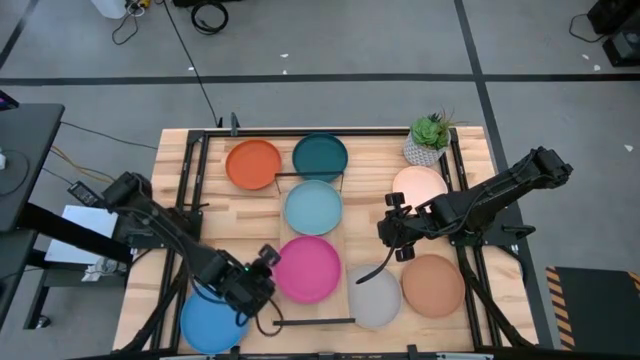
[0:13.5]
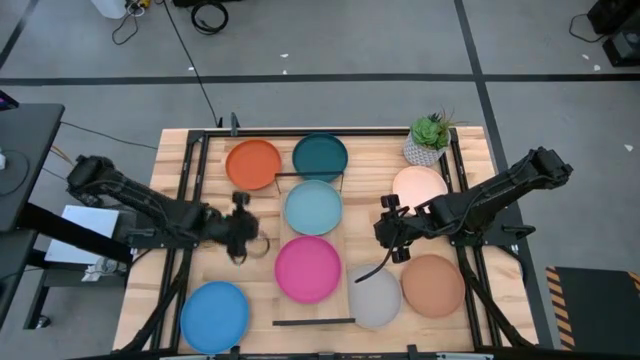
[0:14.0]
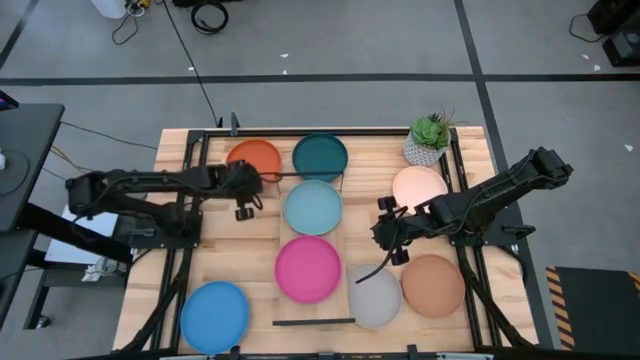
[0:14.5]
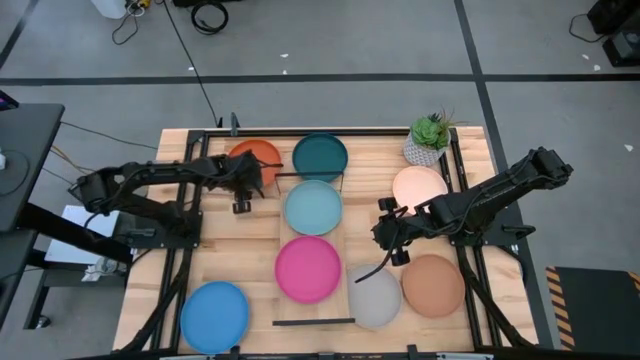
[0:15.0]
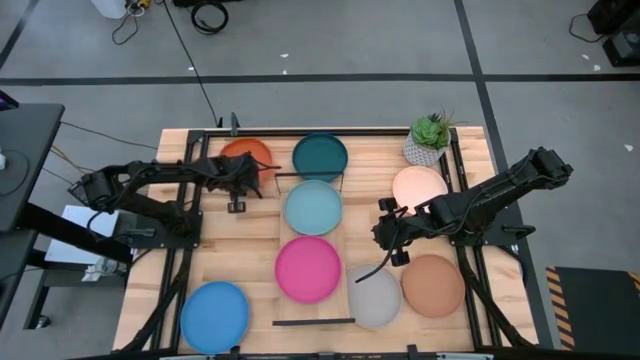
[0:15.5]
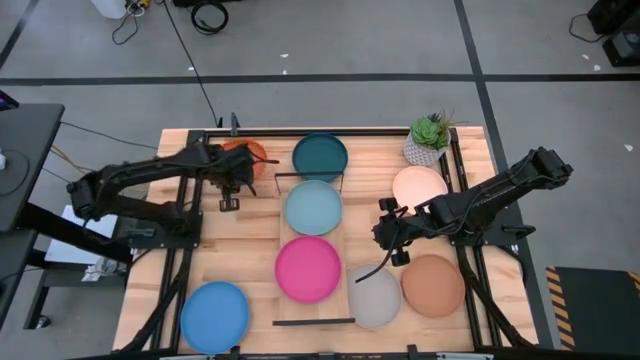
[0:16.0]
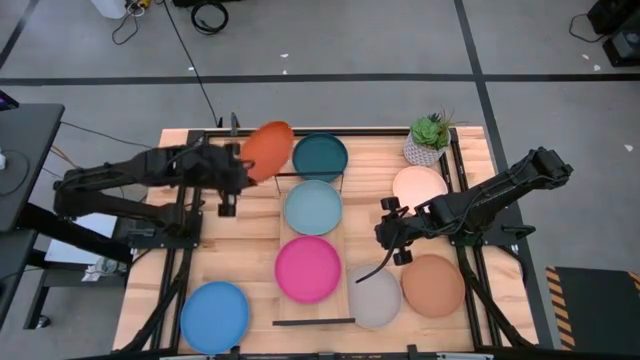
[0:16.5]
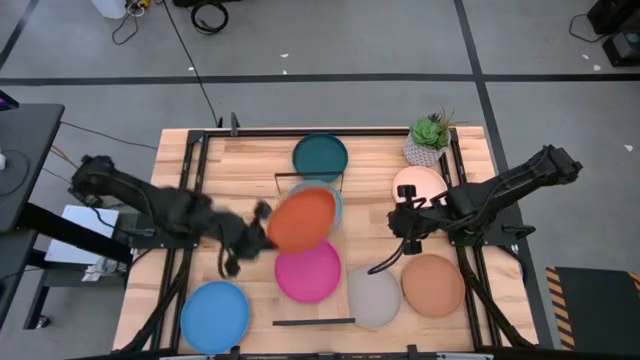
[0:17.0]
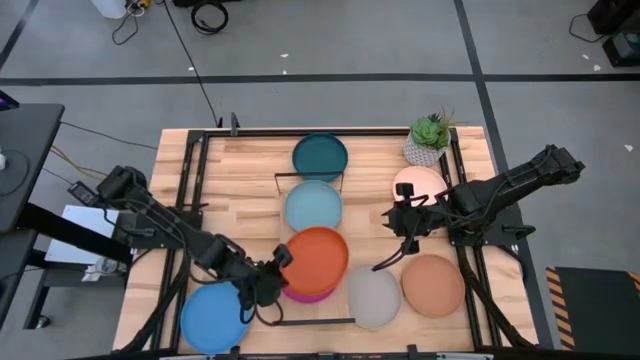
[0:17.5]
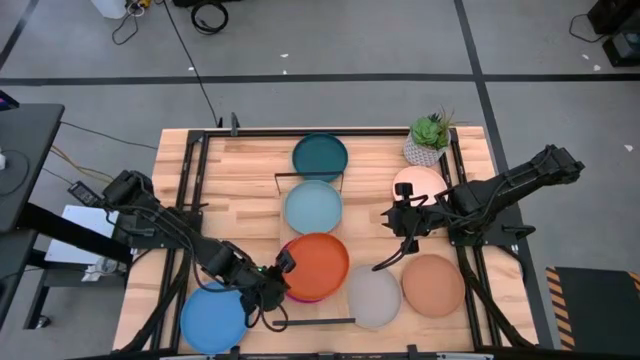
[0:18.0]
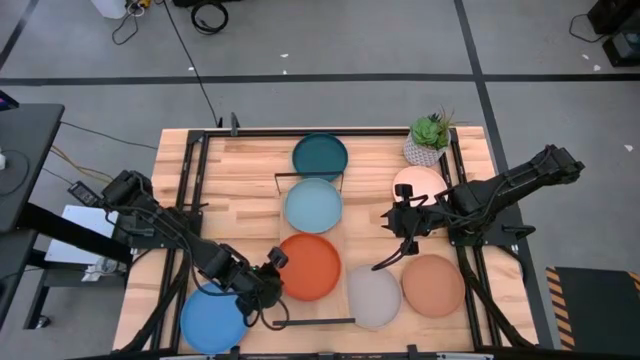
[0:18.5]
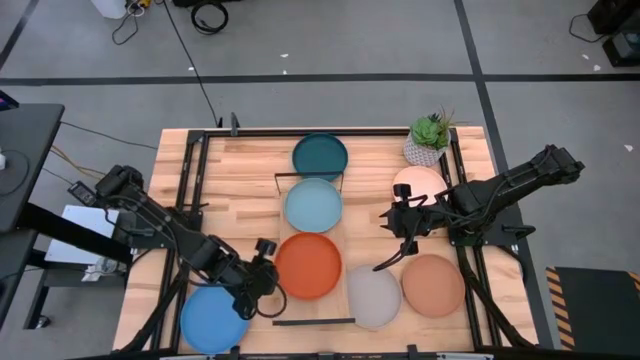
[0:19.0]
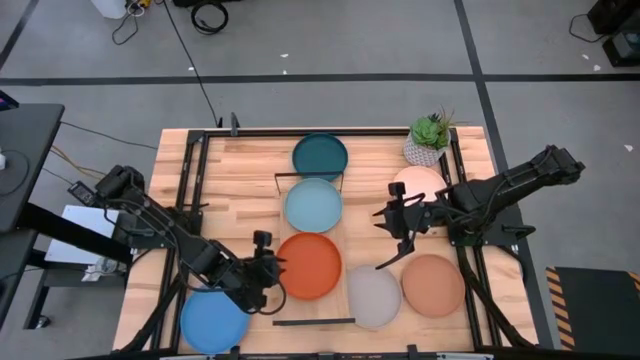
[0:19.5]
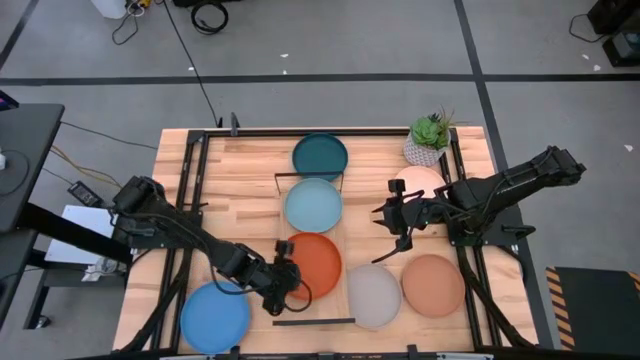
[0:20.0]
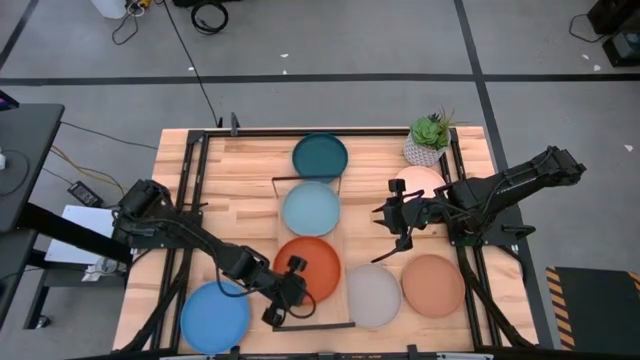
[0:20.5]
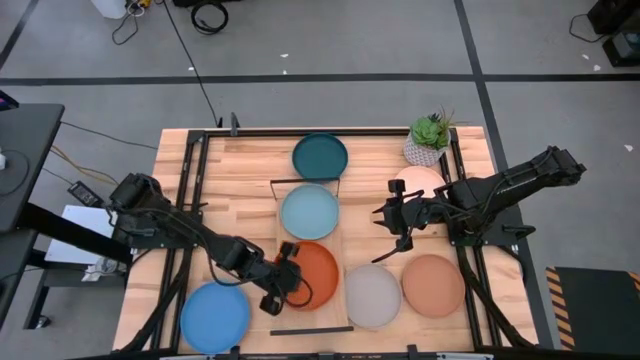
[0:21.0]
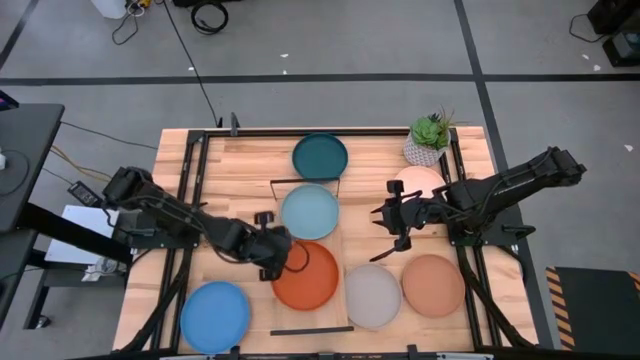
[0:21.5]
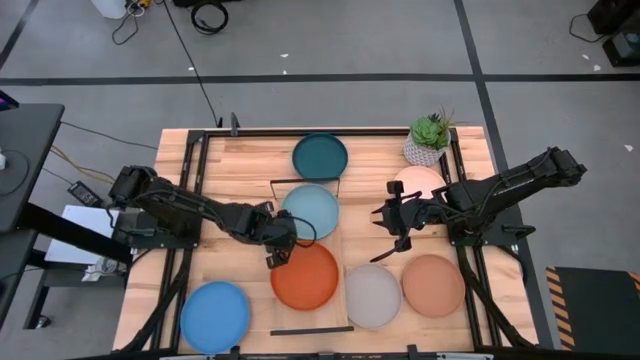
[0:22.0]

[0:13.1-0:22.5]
Task: Place and stack plates onto a shelf
Stack the orange plate on top of the pink plate on the shelf

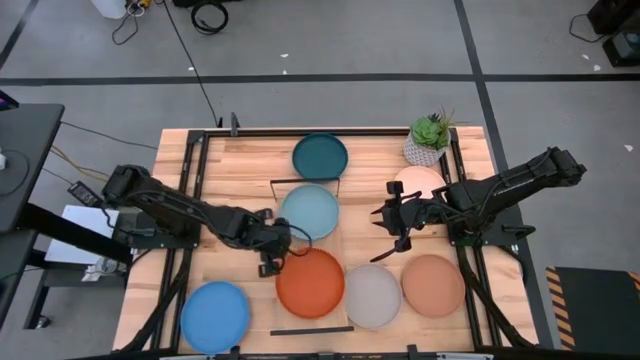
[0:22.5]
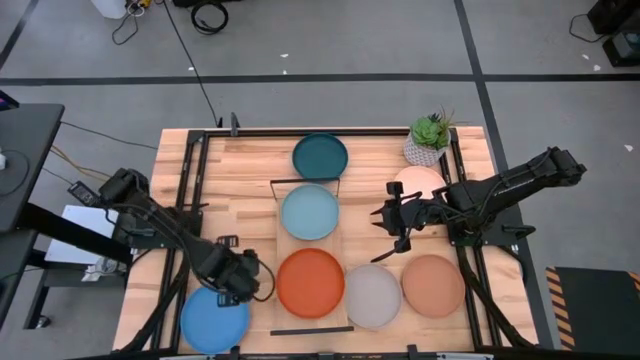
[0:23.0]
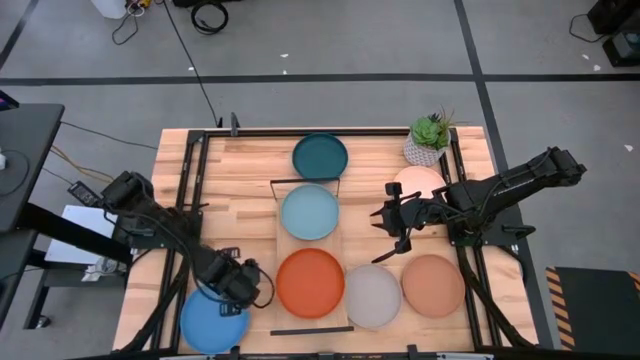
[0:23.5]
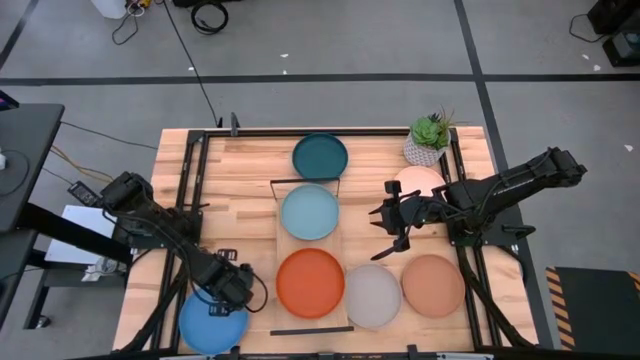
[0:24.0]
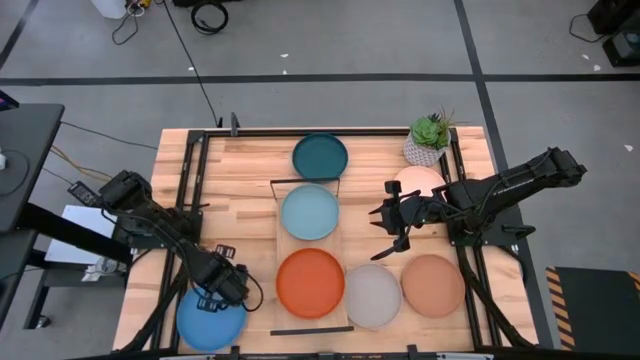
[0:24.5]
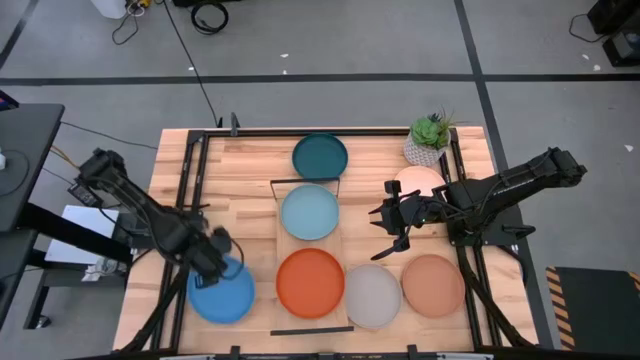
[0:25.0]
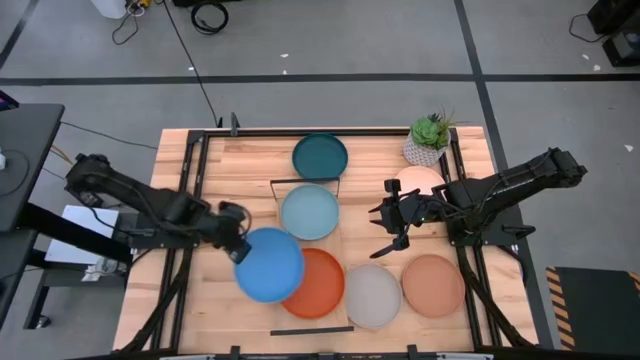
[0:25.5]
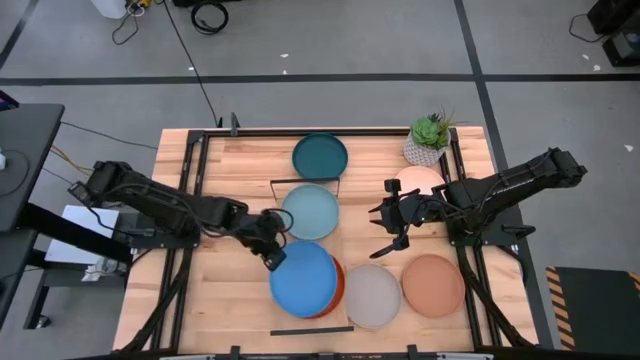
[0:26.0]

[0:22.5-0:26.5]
Stack the blue plate on top of the orange plate on the shelf

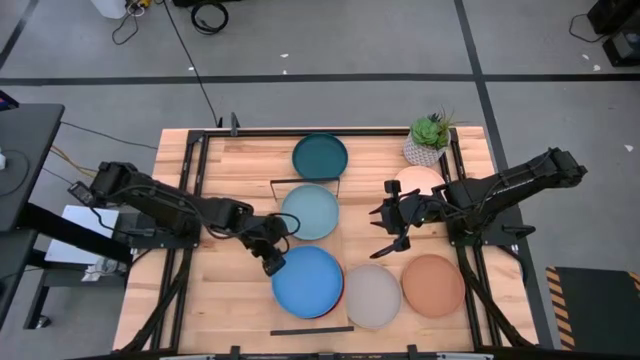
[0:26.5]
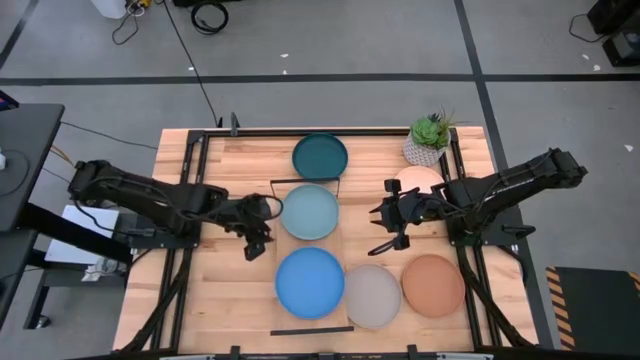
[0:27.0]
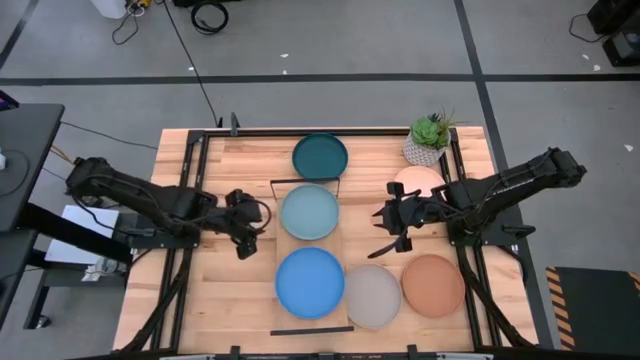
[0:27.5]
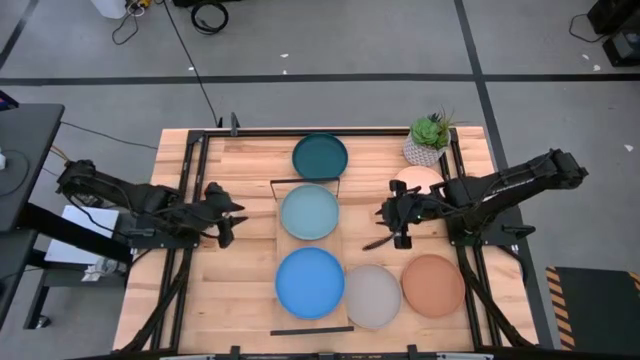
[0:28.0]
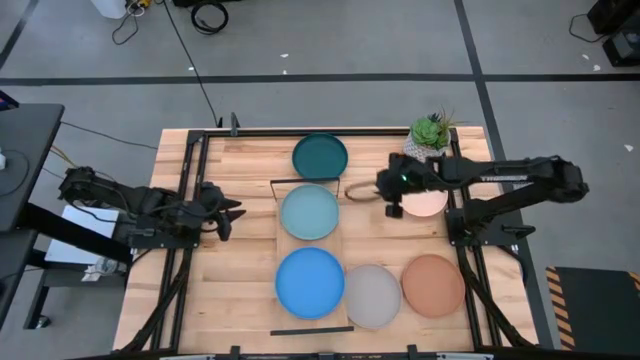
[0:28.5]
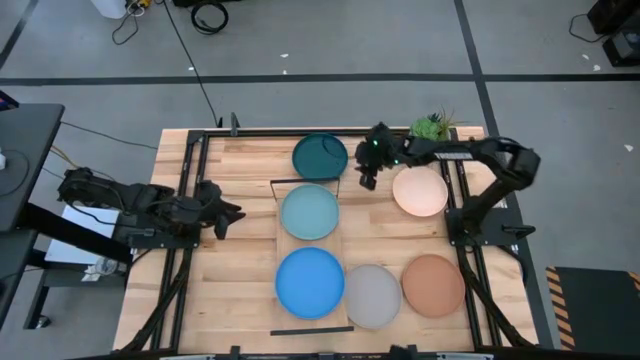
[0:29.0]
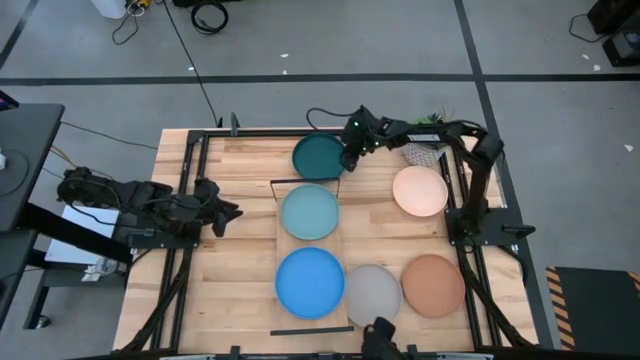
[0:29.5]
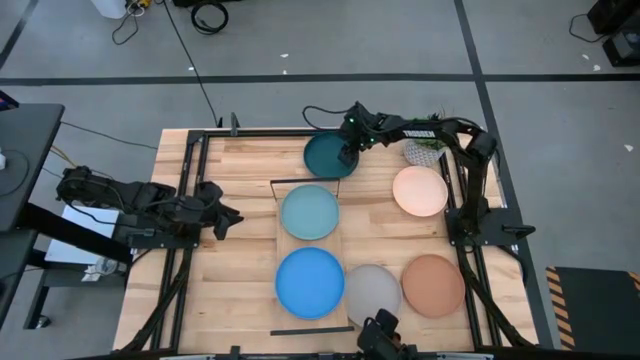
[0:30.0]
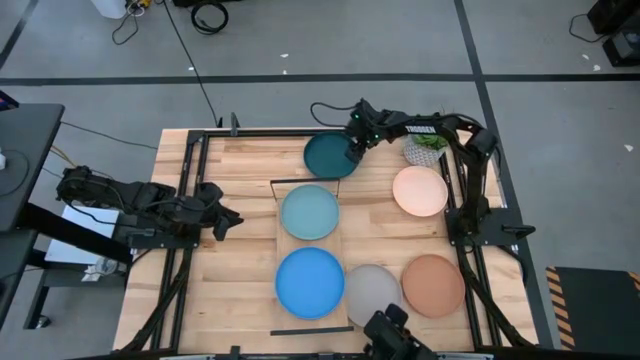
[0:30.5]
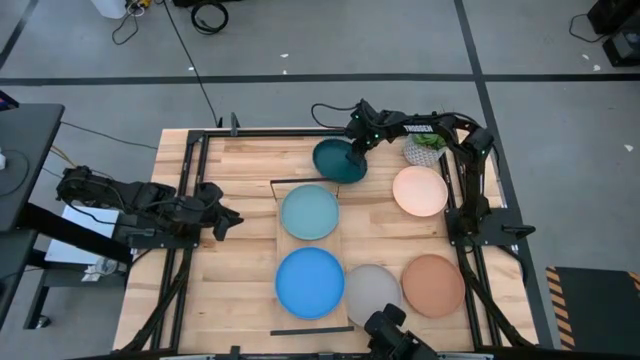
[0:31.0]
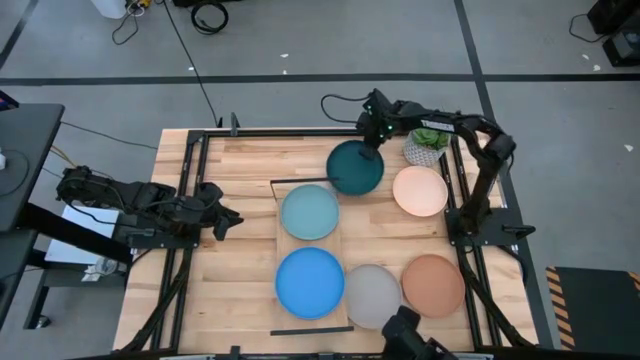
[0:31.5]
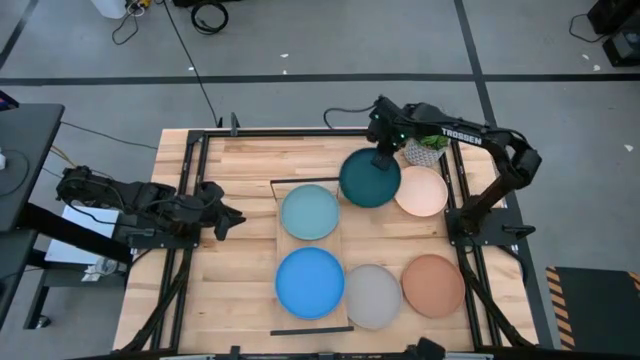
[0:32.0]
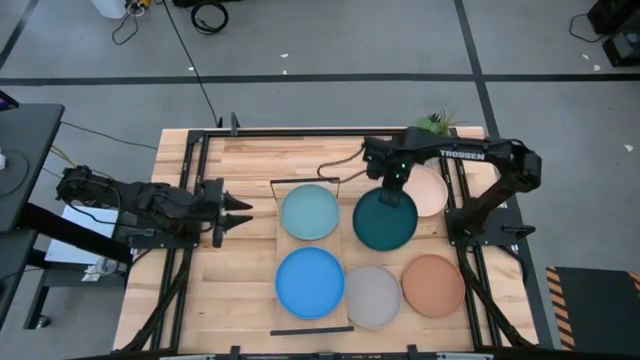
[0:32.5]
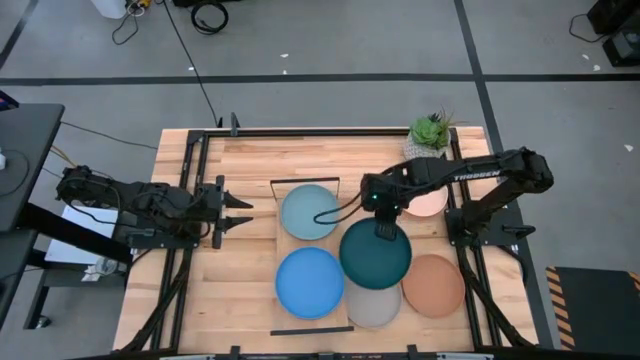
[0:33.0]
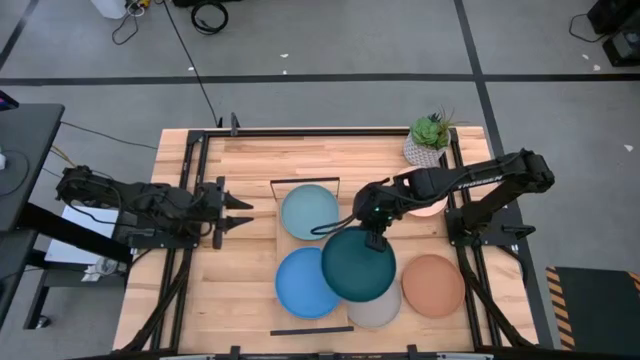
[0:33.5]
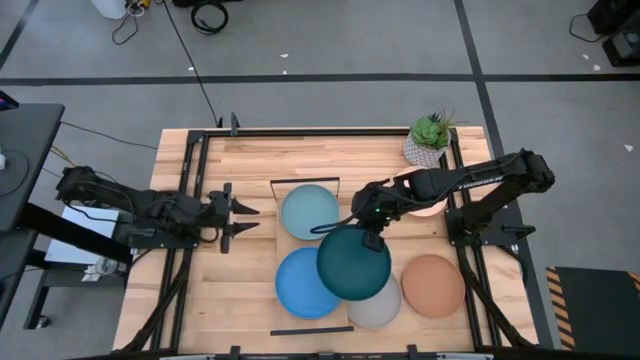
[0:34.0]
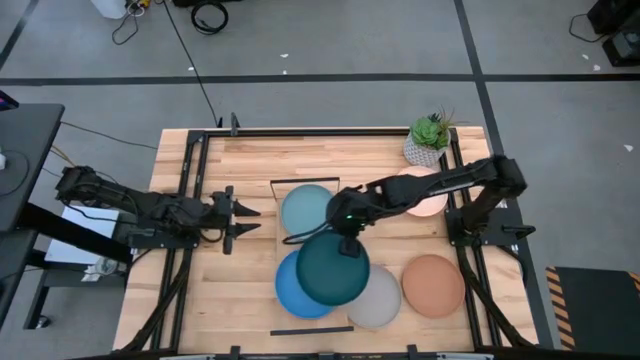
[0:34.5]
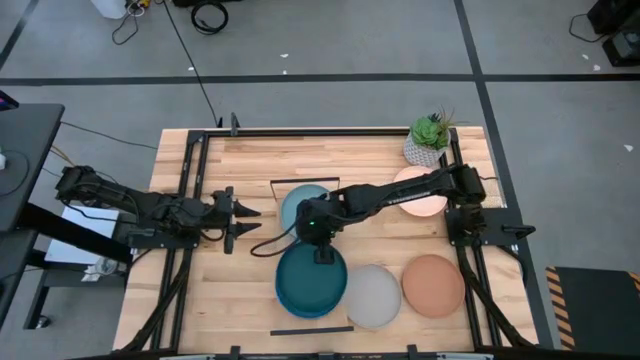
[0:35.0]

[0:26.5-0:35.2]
Stack the green plate on top of the blue plate on the shelf
